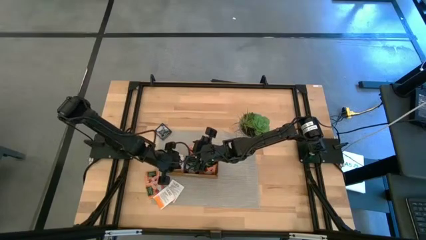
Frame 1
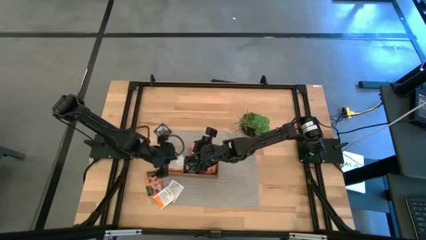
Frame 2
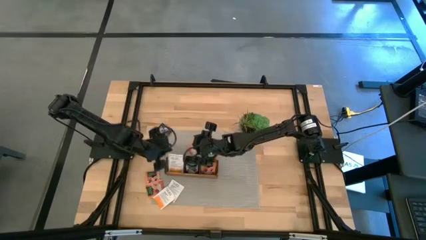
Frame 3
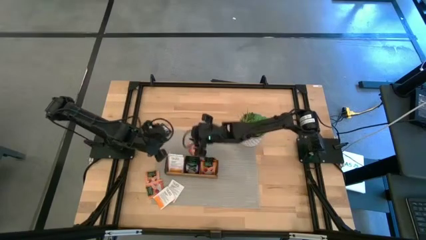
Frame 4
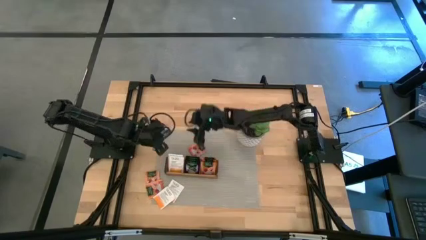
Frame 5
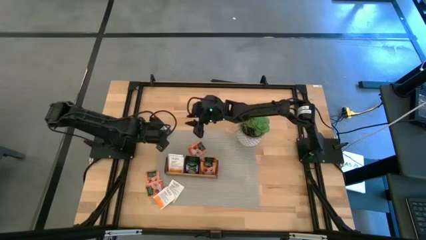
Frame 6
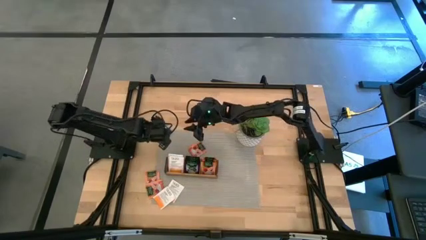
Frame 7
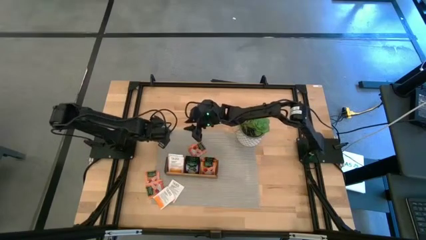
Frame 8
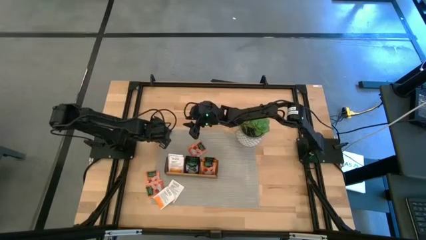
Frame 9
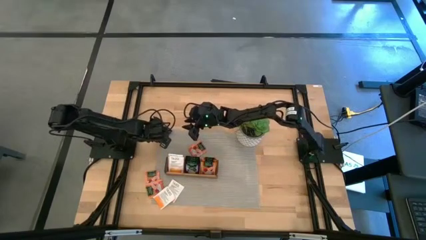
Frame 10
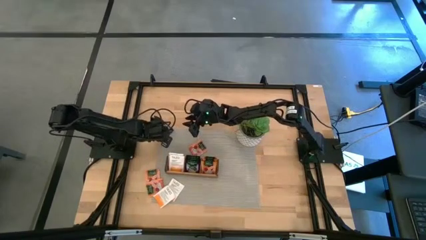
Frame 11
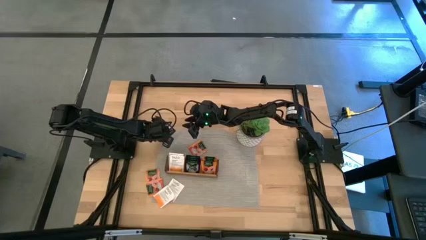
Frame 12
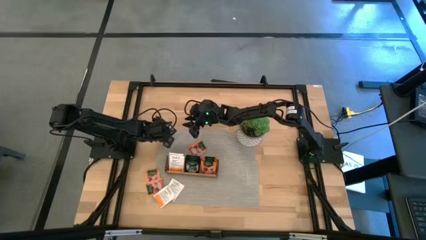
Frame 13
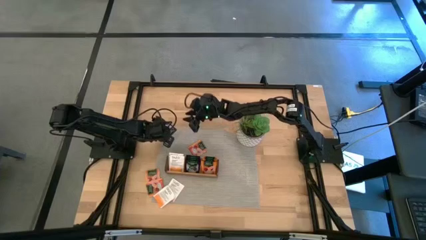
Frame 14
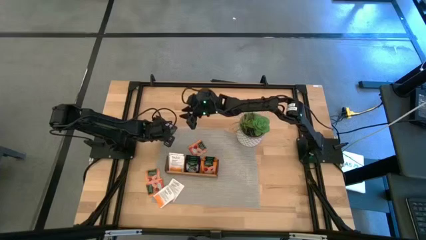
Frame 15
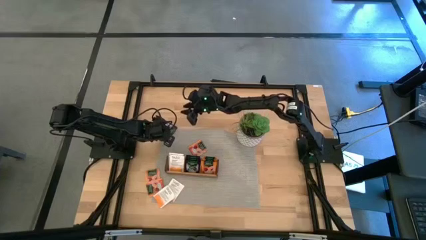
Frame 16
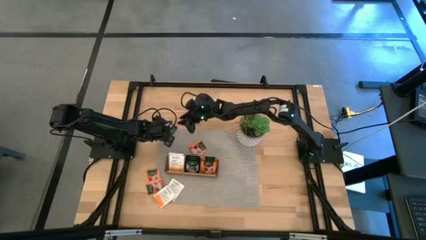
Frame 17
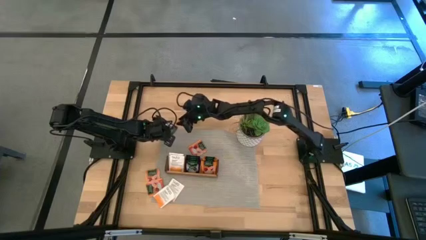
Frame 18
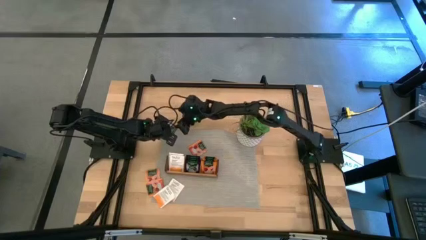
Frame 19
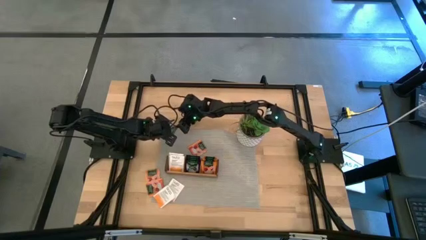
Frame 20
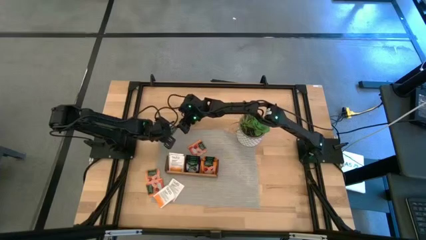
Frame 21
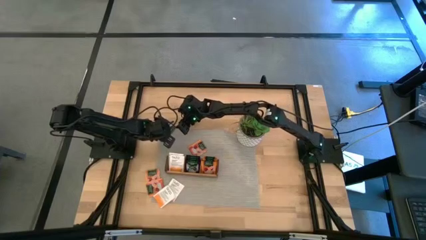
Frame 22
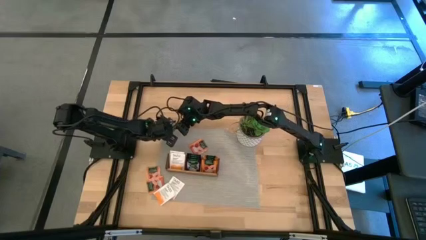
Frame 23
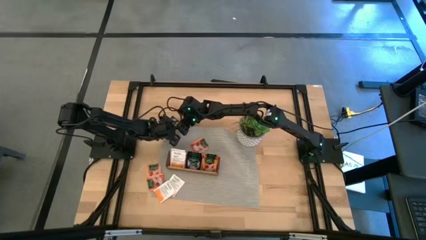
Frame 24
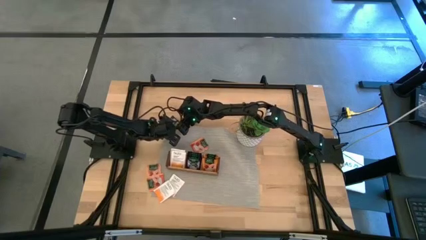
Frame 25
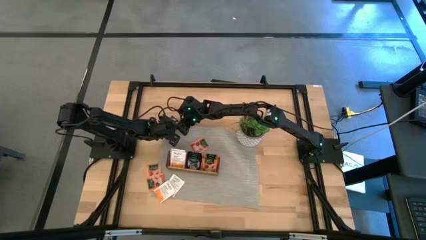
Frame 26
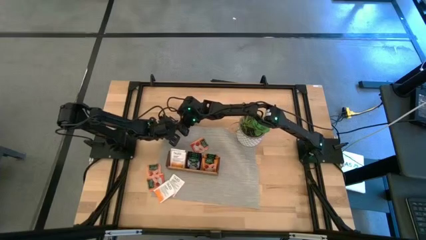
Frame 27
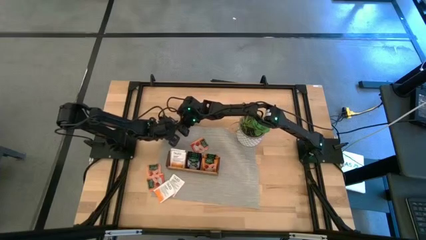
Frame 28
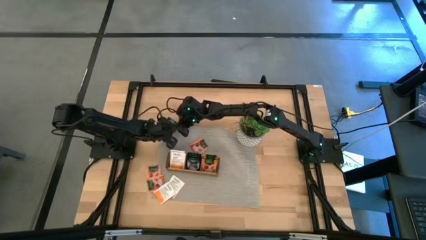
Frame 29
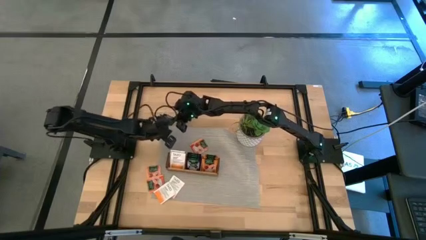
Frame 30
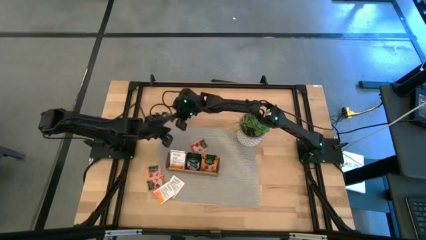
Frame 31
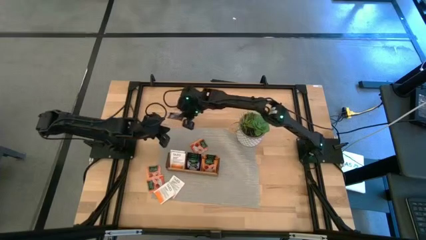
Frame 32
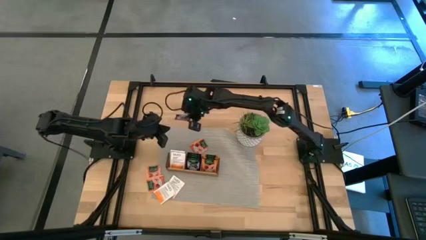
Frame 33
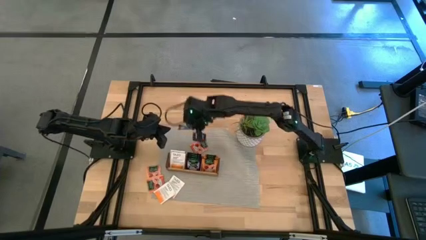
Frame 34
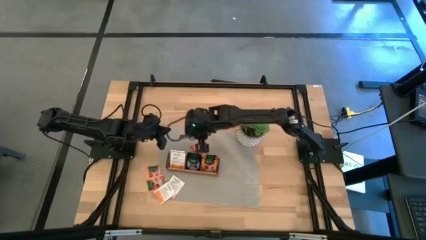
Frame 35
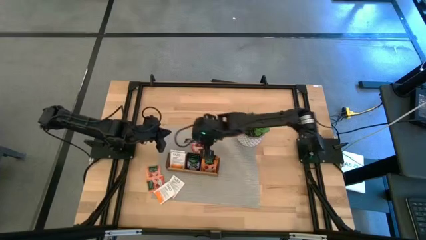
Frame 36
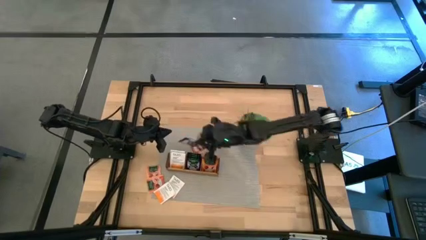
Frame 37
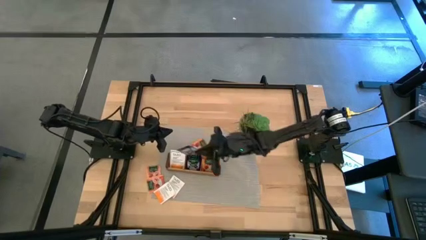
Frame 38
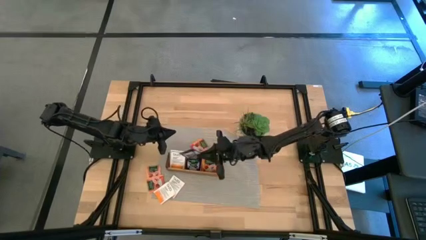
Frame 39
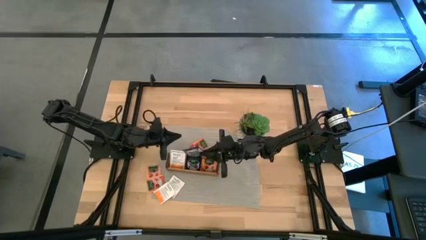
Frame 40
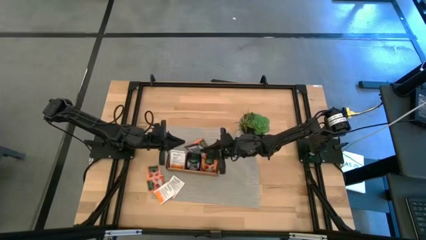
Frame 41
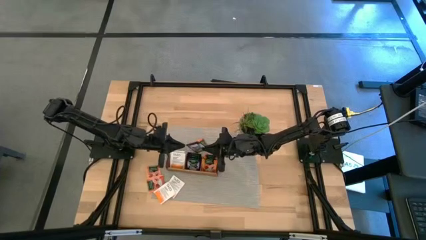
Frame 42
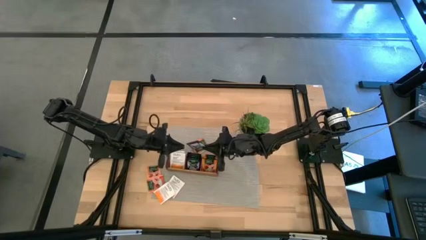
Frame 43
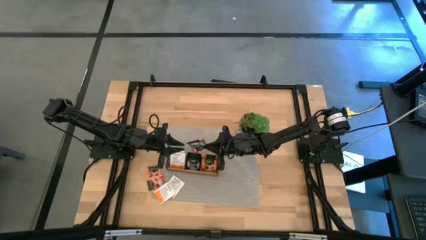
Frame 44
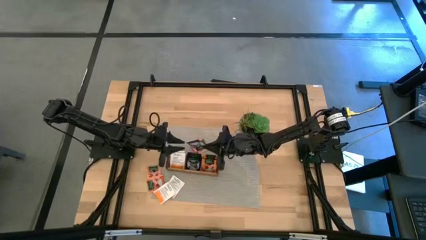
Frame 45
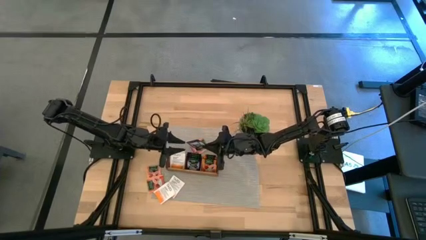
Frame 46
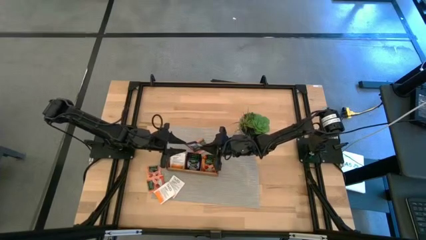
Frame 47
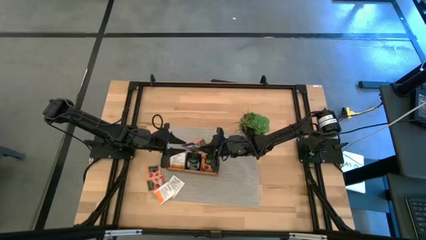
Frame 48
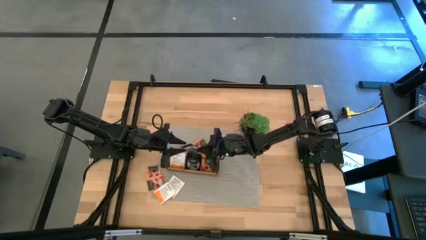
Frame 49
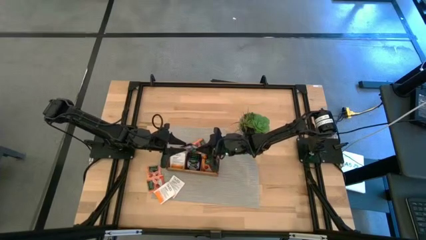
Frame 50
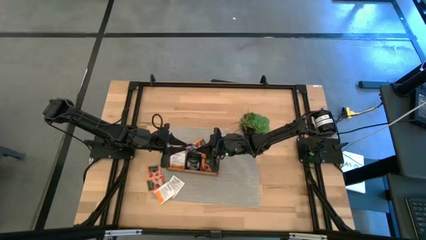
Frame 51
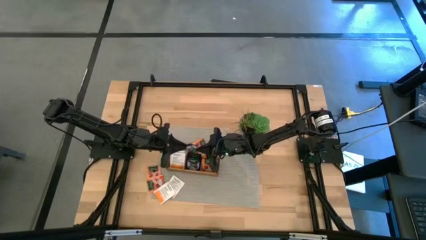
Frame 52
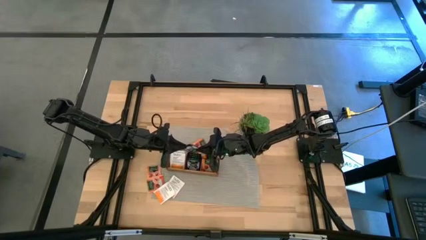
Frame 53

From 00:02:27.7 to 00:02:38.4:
Task: Pick & Place Tea
Put the violet tea bag into the middle section of the wooden organizer

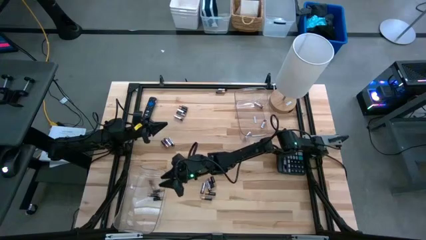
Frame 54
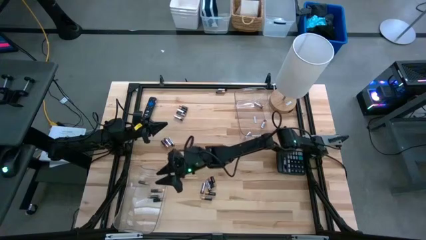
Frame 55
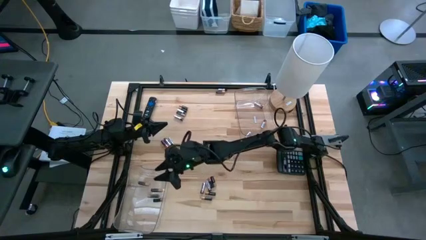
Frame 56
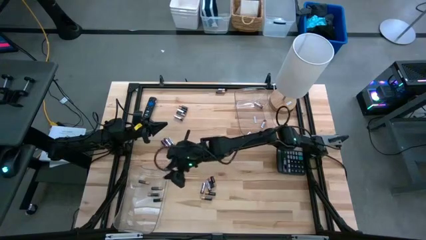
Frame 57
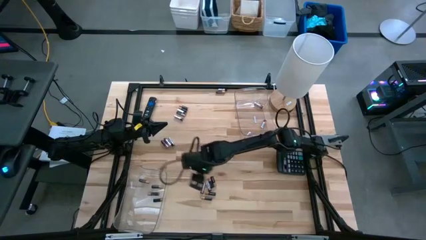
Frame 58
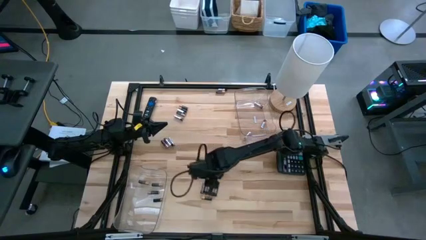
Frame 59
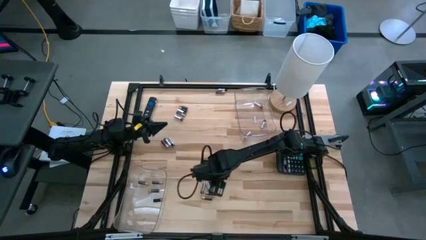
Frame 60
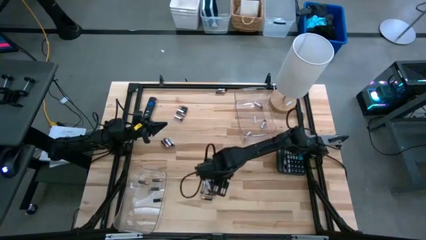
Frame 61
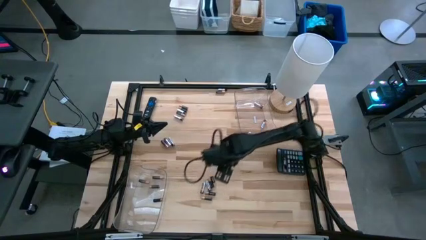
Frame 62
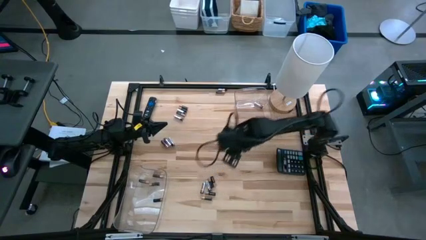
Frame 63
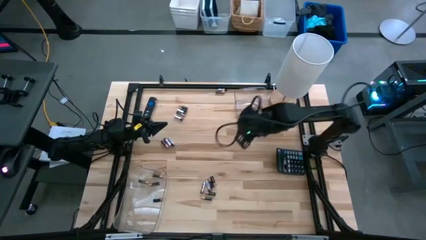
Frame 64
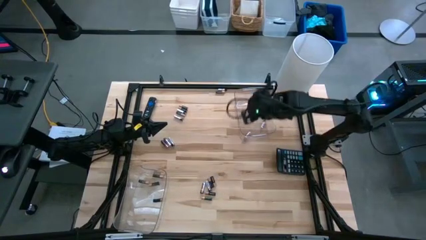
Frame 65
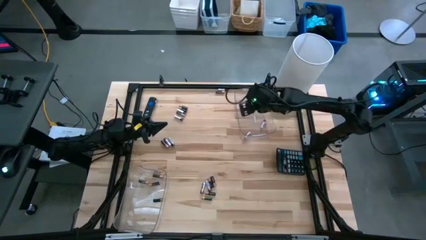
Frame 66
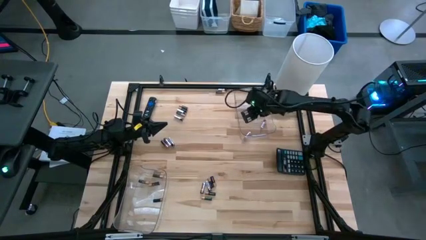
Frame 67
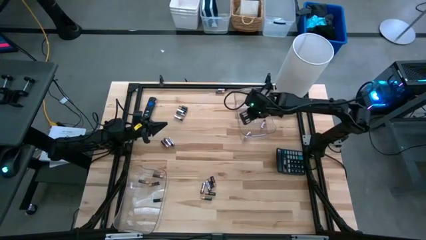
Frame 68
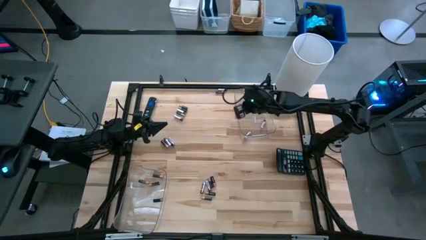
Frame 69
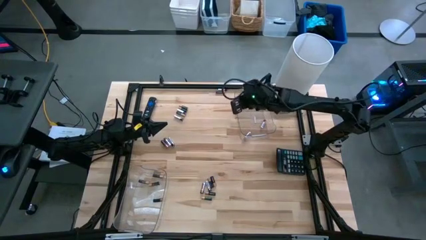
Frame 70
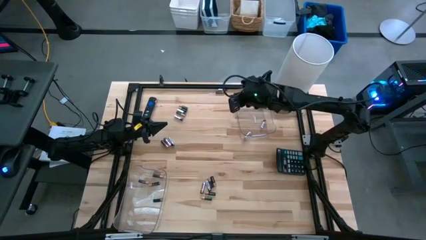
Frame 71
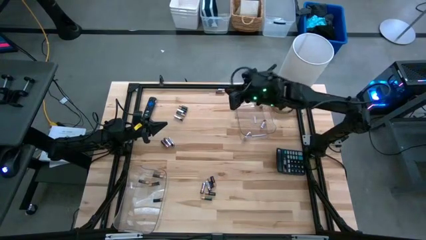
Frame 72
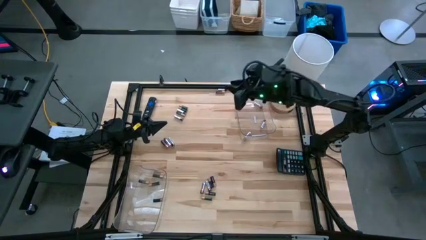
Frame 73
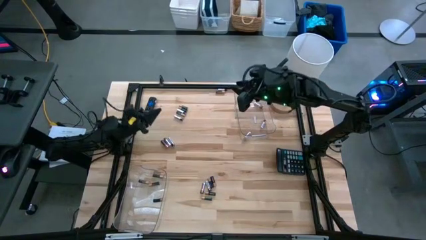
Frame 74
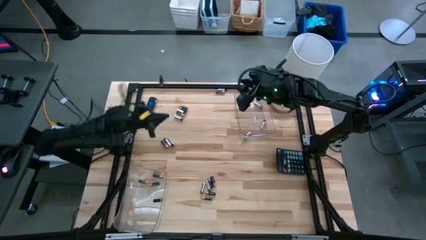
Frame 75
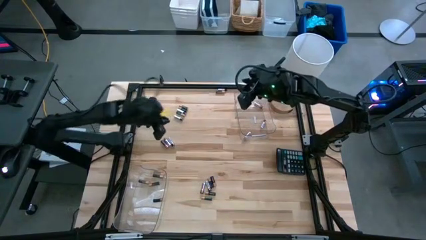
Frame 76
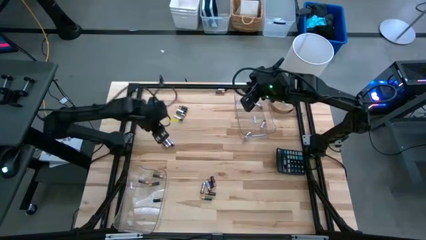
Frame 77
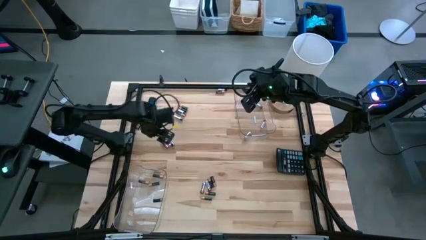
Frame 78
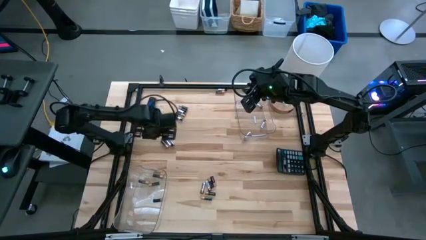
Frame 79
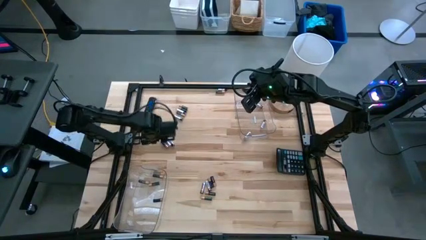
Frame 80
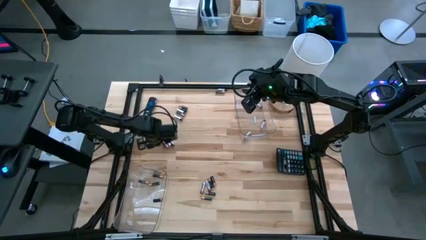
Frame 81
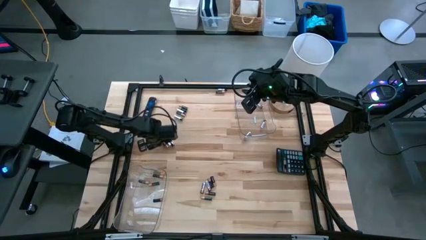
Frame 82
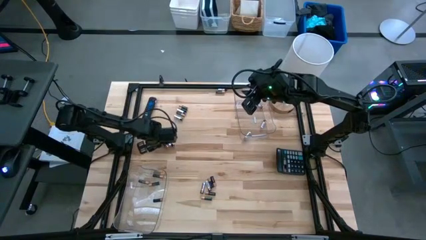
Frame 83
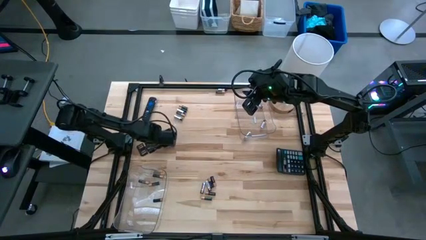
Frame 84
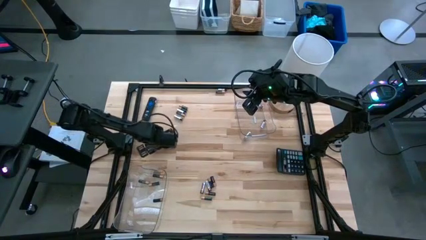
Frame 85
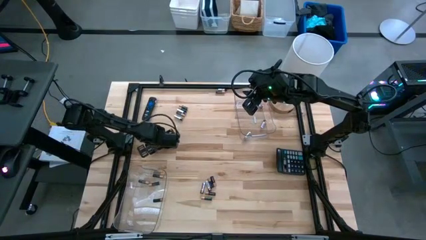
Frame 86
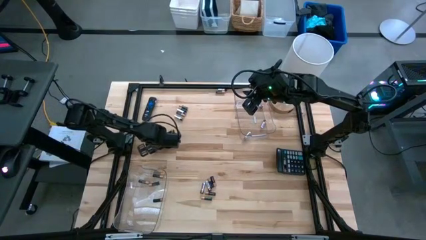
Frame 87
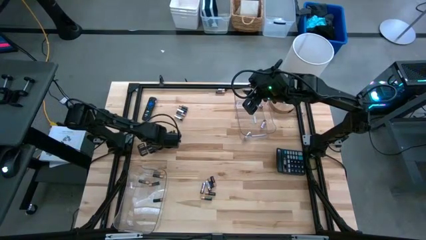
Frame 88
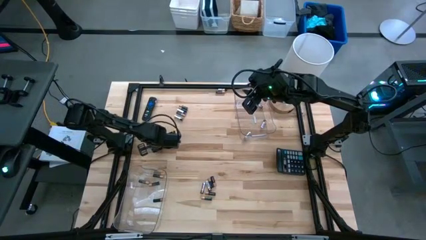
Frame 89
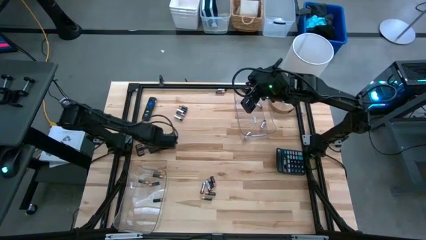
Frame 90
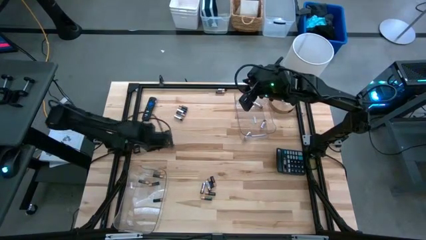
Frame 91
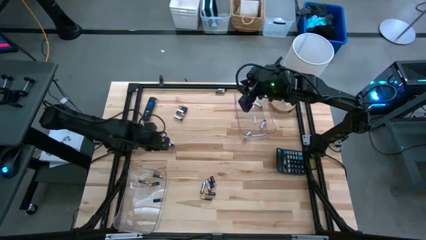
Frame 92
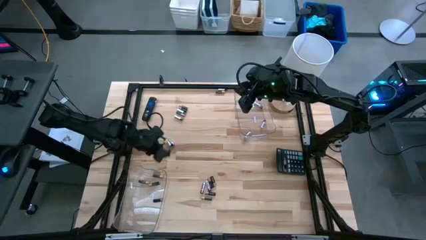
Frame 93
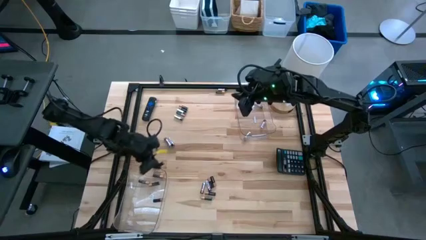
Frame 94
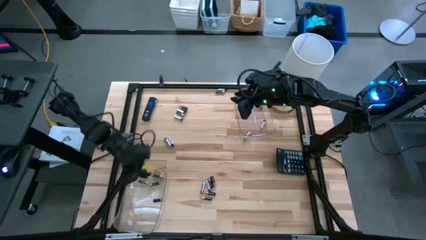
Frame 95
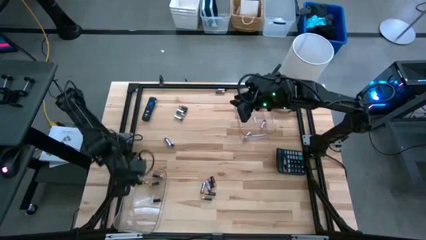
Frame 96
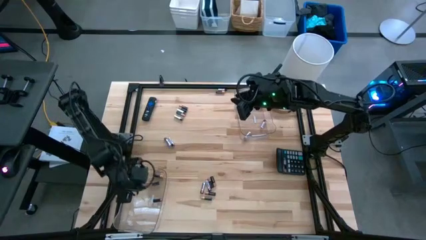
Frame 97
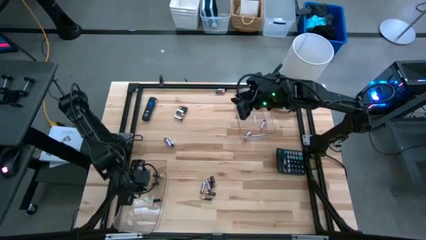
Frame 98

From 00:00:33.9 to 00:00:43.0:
Task: Sort batteries
Put the brown battery into the left transparent bin
